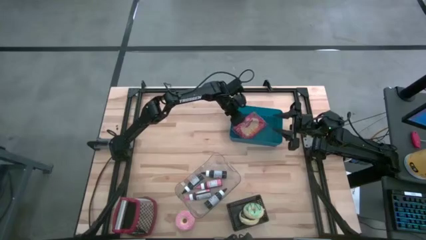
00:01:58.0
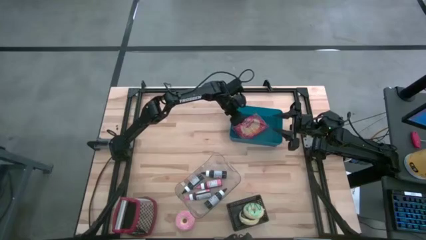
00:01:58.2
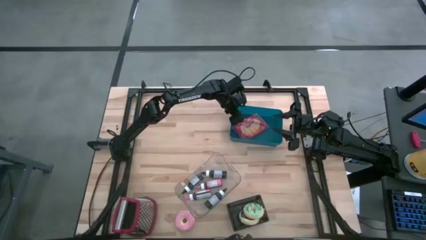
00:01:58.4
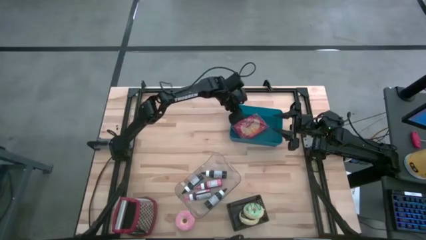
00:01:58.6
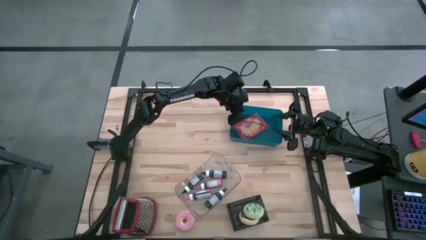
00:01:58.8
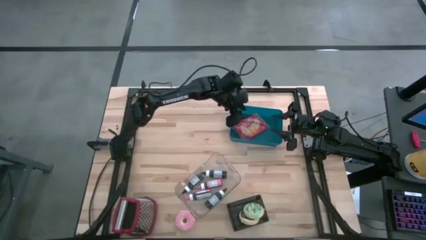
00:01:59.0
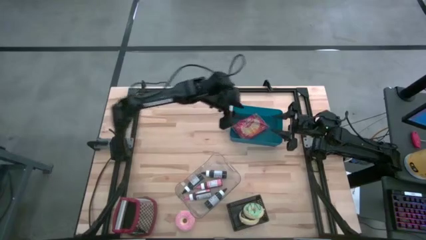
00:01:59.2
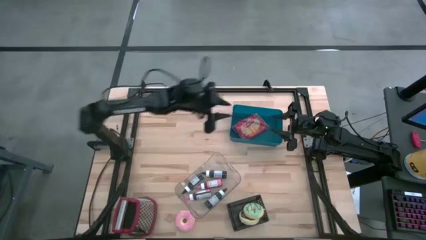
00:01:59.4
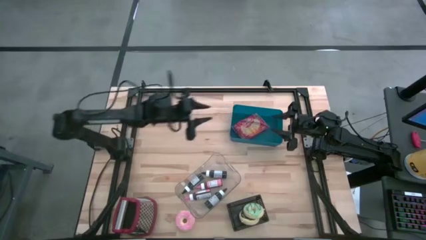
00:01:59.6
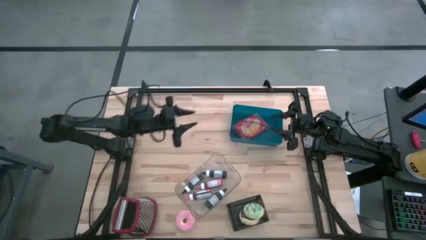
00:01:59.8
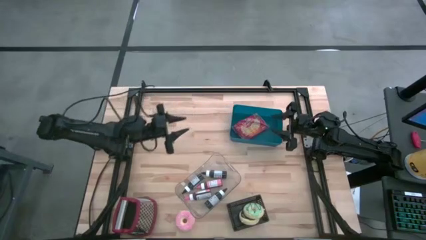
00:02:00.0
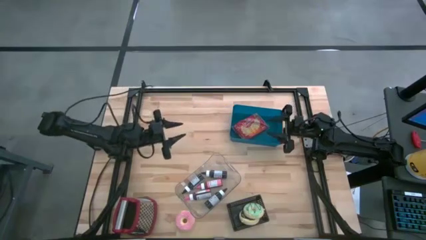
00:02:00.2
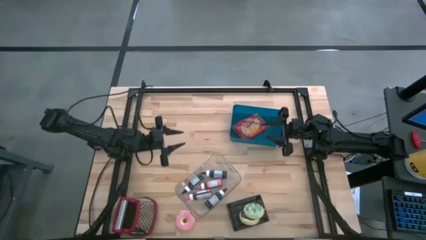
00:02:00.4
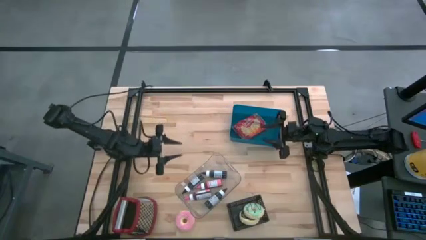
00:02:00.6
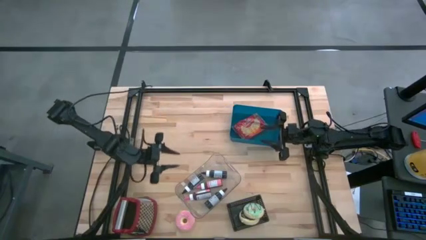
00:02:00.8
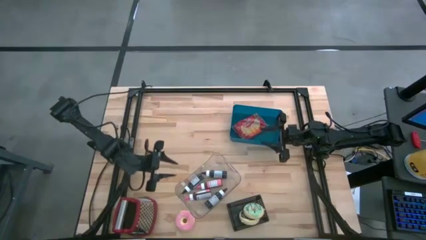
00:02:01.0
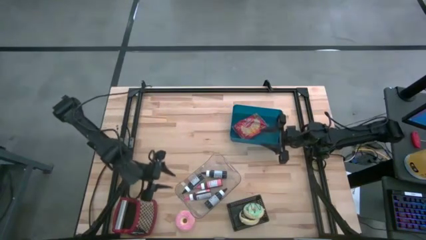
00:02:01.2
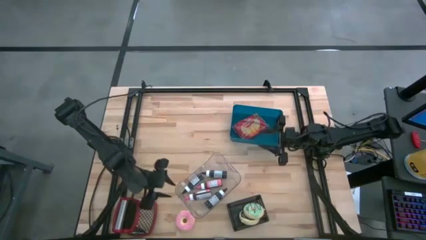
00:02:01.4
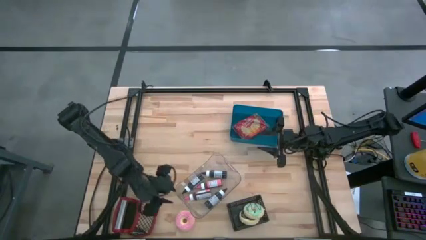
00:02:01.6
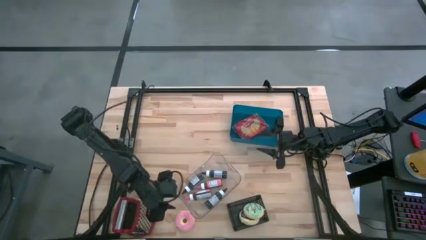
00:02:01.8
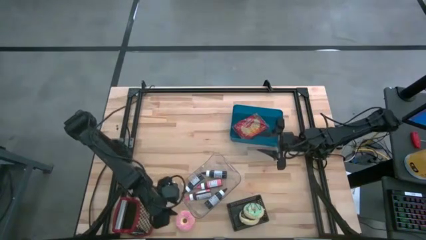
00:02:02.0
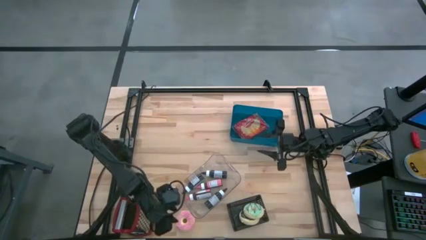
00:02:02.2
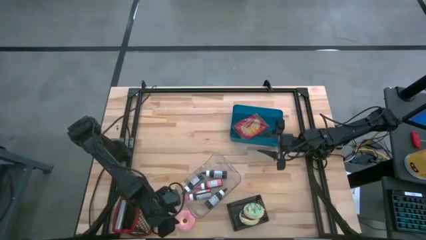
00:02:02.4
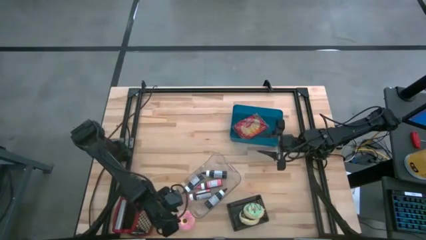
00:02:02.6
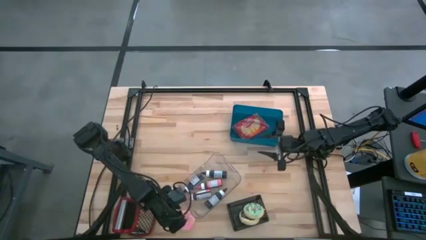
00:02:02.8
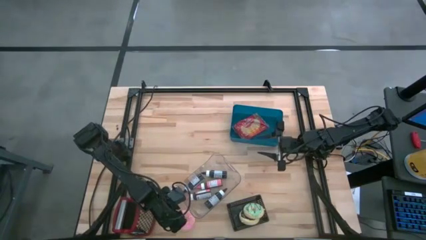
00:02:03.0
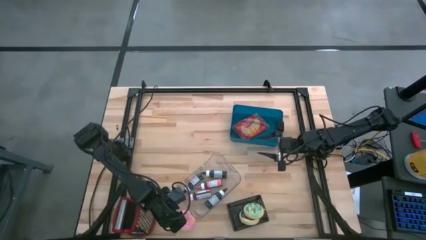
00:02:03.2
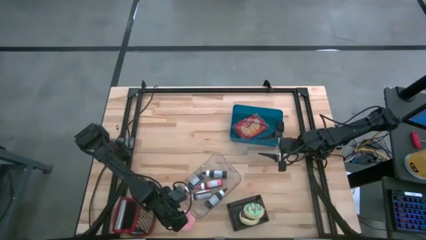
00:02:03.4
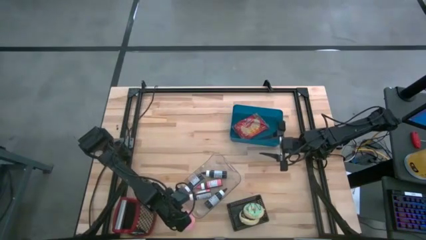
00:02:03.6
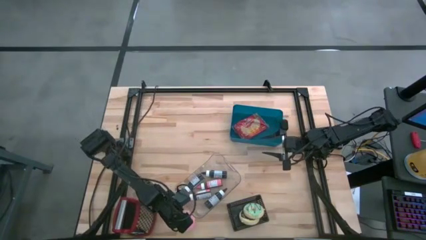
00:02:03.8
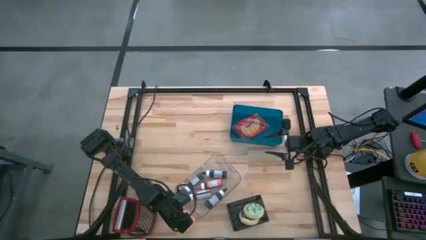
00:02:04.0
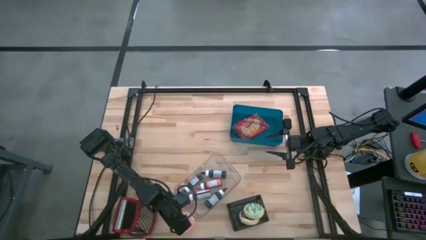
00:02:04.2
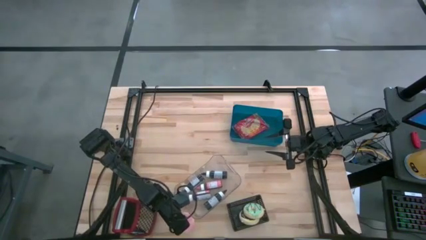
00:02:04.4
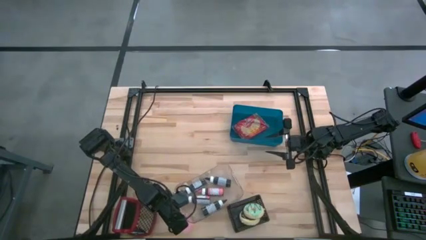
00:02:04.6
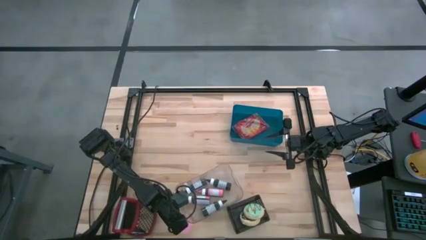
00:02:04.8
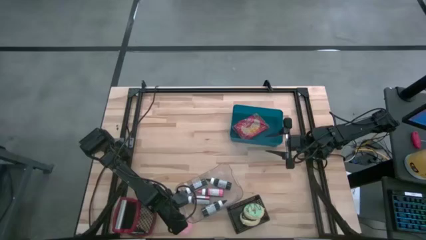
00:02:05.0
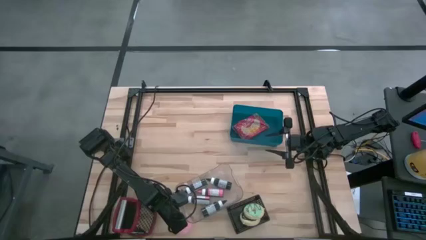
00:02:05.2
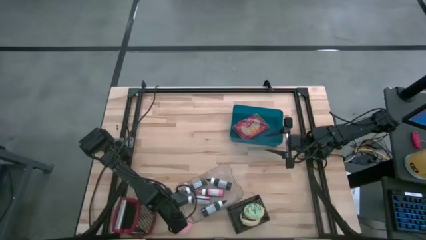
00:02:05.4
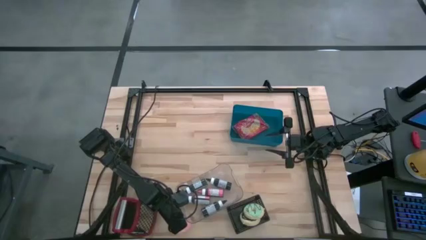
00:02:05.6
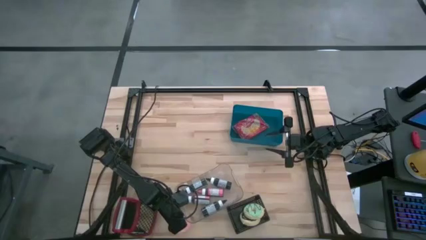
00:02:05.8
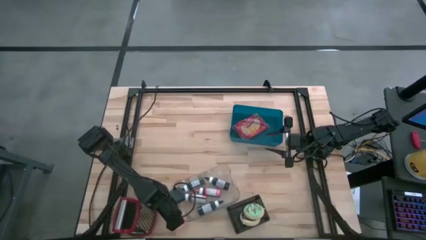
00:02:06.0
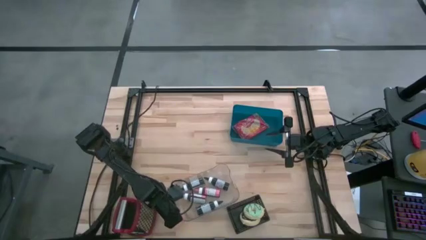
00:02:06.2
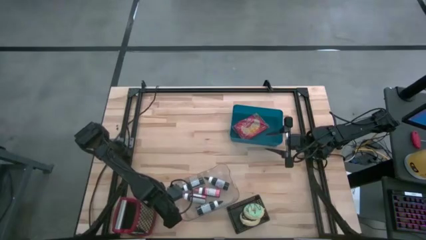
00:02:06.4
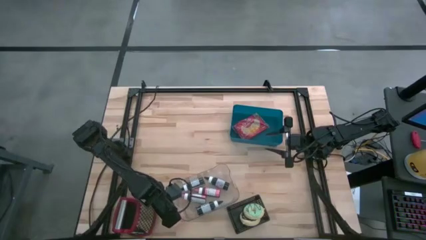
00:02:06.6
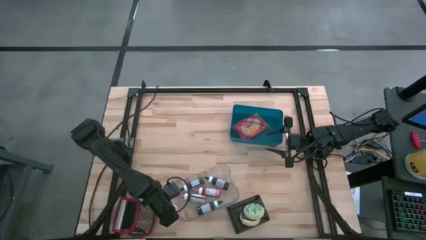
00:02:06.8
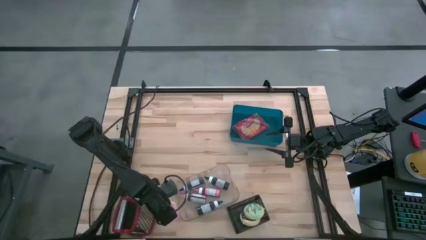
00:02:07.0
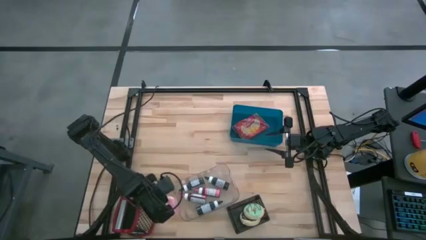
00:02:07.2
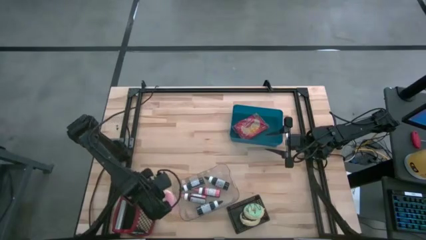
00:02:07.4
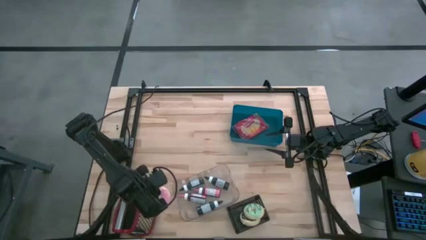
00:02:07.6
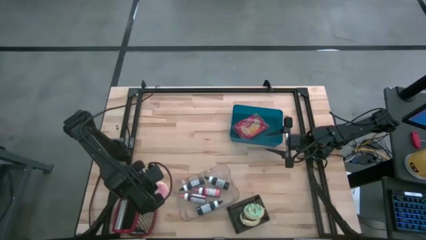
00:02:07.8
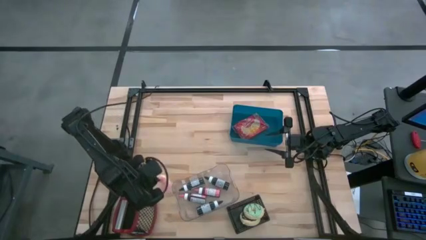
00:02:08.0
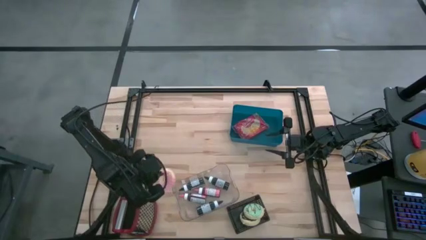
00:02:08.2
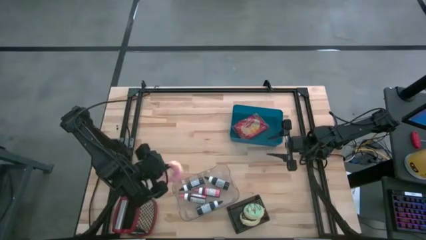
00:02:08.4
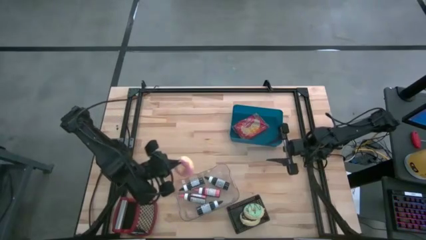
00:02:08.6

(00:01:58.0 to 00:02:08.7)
Put the pink donut into the black basket
